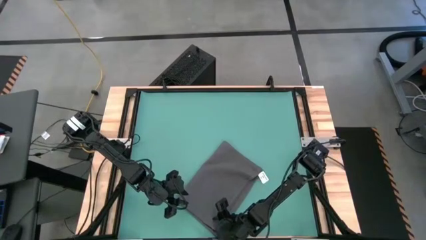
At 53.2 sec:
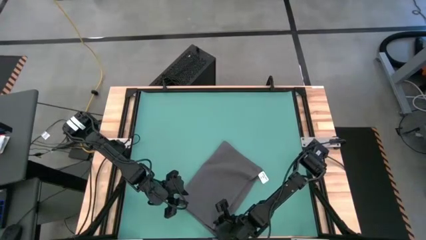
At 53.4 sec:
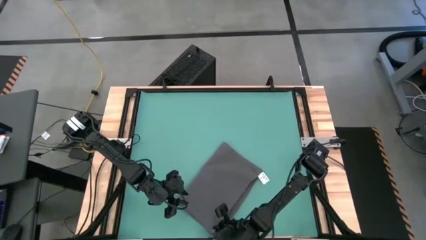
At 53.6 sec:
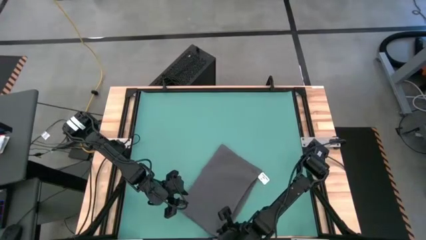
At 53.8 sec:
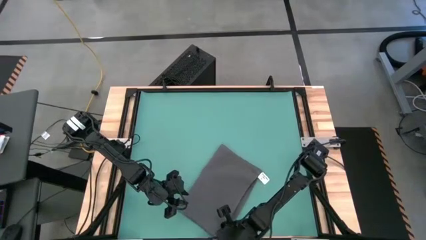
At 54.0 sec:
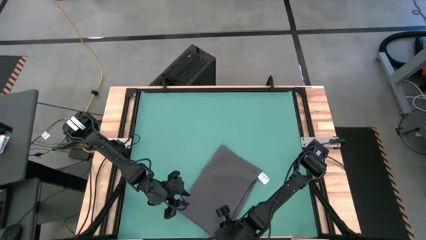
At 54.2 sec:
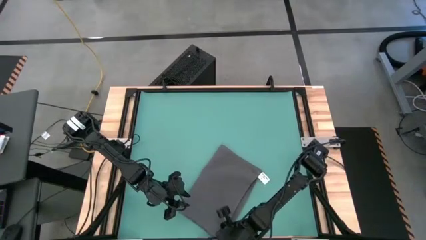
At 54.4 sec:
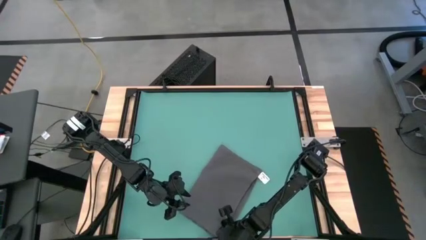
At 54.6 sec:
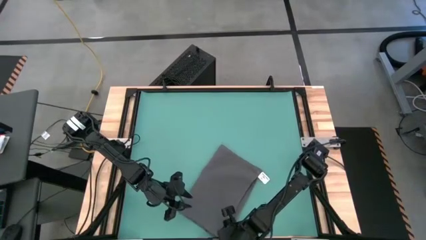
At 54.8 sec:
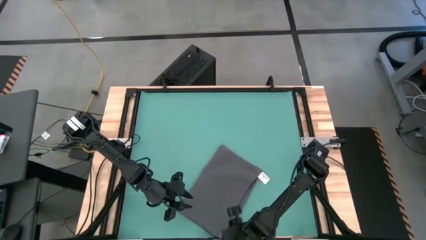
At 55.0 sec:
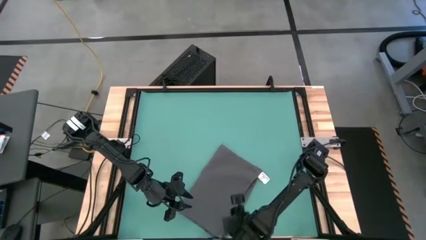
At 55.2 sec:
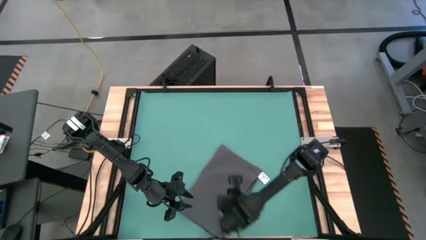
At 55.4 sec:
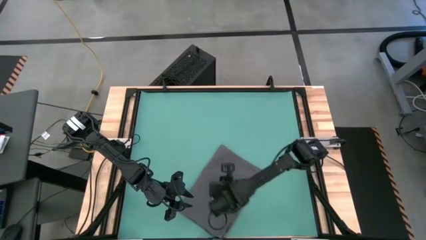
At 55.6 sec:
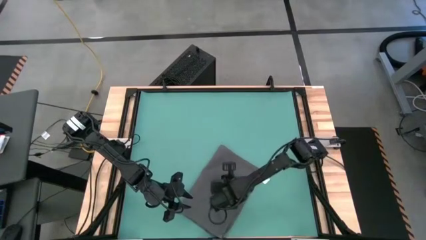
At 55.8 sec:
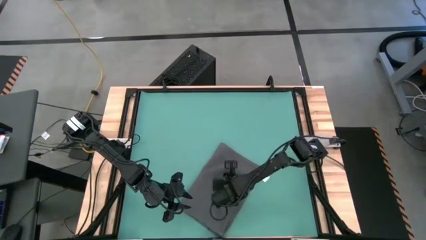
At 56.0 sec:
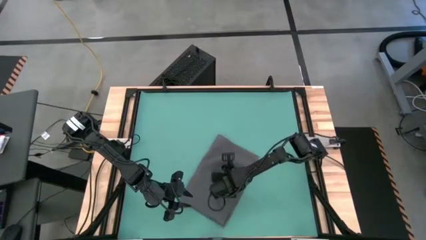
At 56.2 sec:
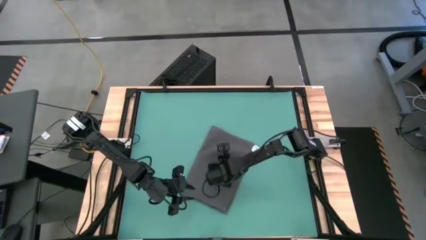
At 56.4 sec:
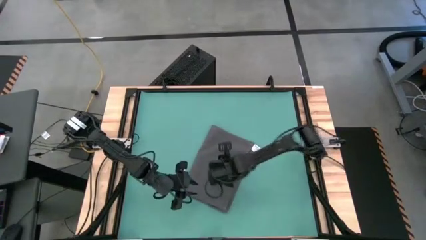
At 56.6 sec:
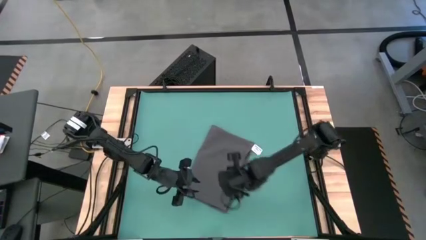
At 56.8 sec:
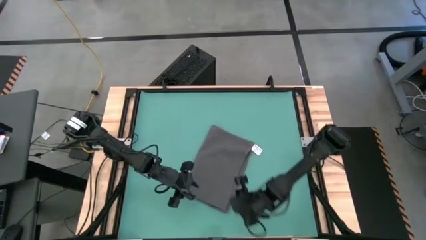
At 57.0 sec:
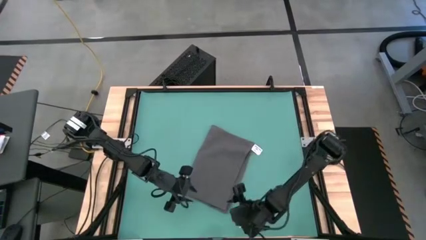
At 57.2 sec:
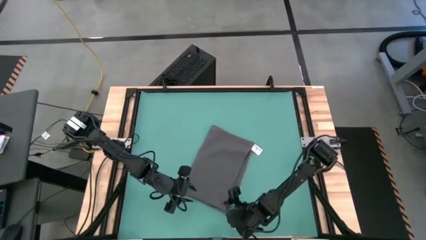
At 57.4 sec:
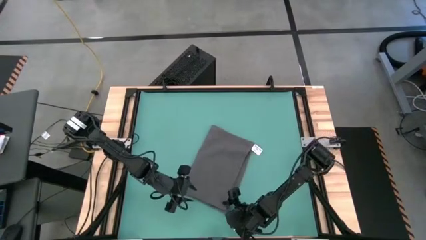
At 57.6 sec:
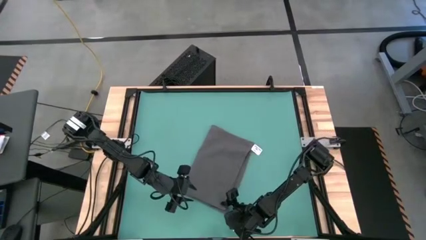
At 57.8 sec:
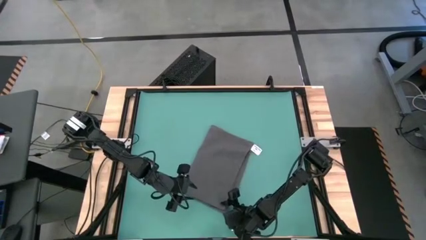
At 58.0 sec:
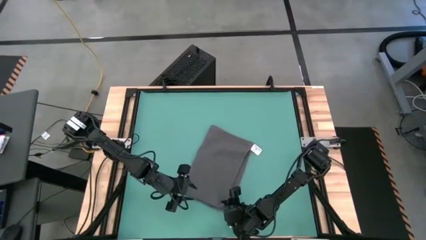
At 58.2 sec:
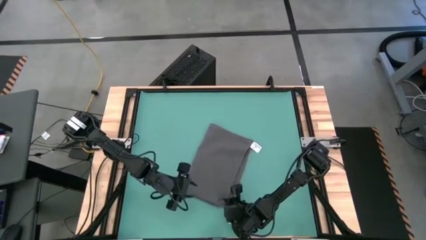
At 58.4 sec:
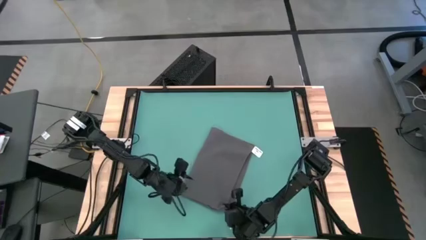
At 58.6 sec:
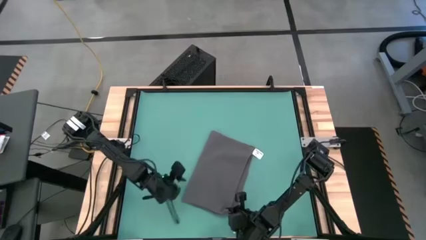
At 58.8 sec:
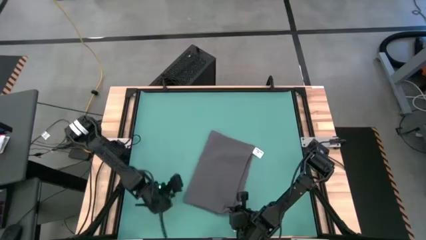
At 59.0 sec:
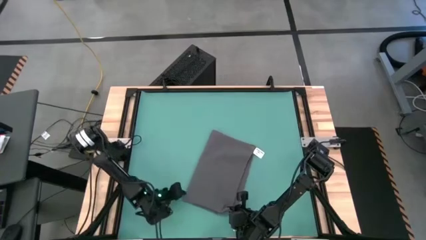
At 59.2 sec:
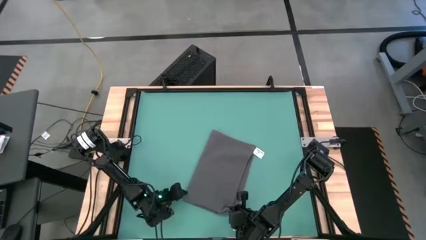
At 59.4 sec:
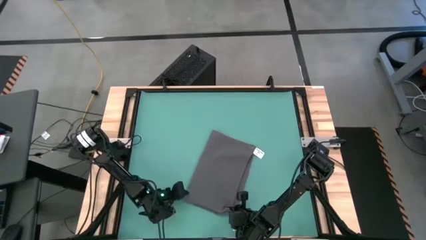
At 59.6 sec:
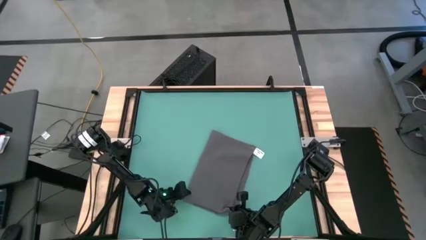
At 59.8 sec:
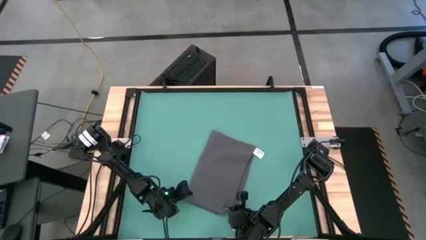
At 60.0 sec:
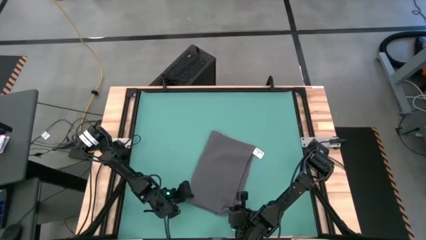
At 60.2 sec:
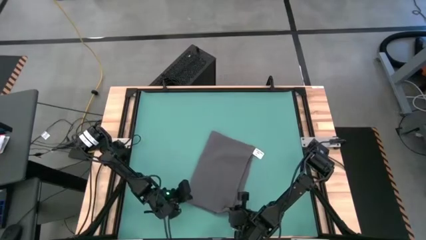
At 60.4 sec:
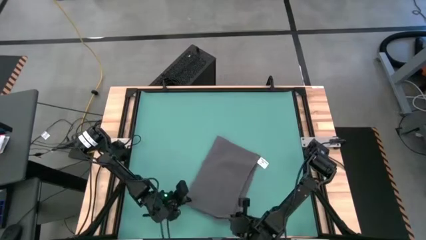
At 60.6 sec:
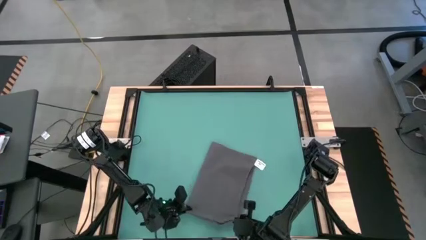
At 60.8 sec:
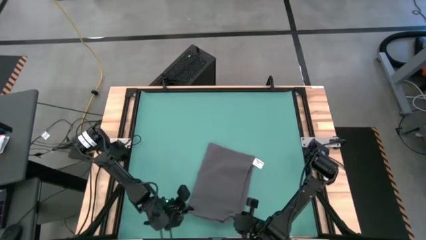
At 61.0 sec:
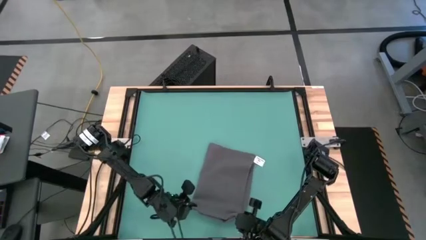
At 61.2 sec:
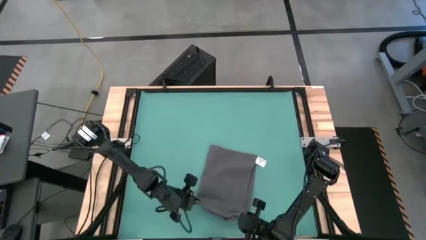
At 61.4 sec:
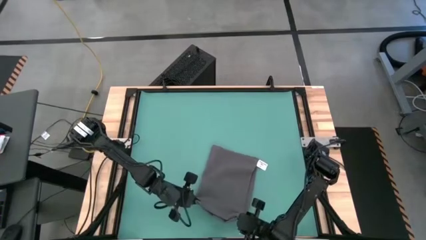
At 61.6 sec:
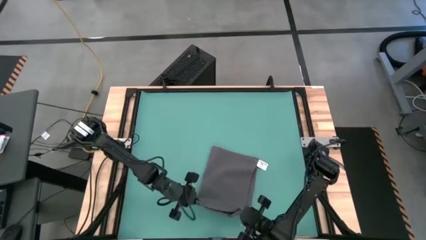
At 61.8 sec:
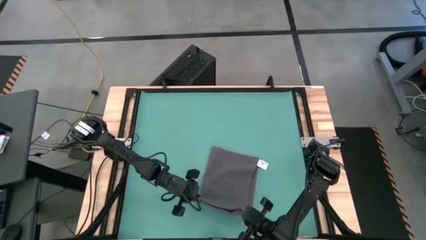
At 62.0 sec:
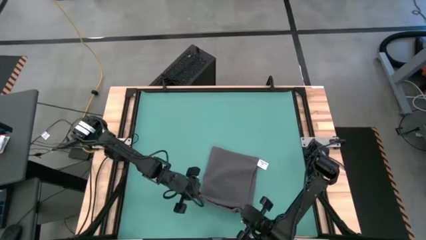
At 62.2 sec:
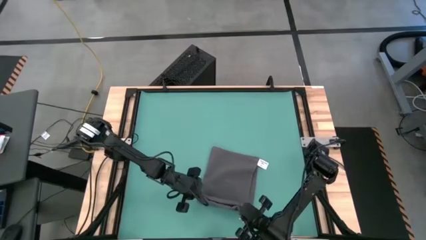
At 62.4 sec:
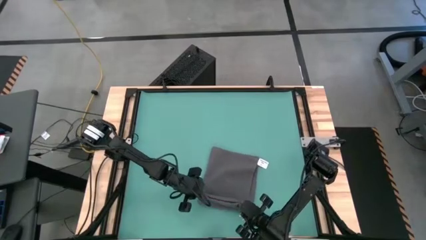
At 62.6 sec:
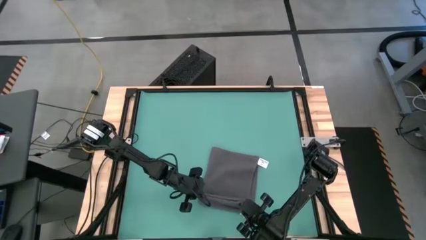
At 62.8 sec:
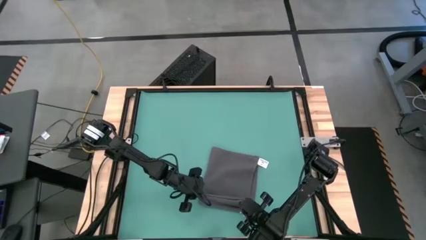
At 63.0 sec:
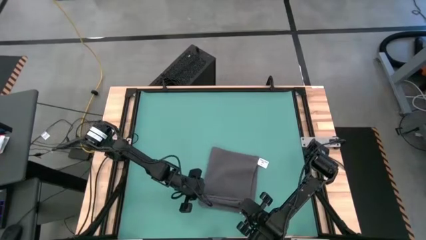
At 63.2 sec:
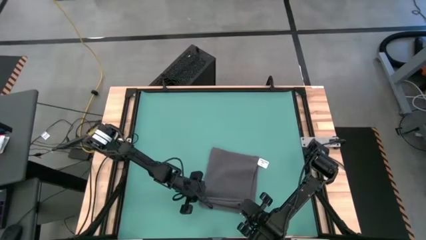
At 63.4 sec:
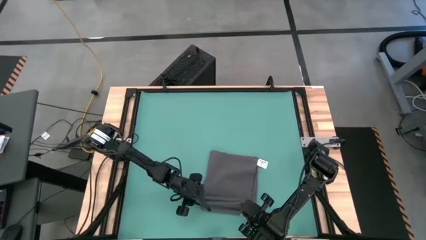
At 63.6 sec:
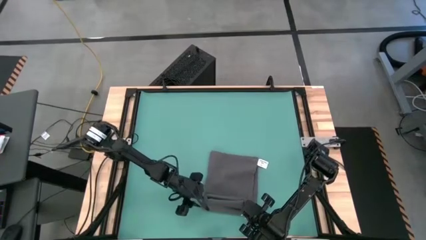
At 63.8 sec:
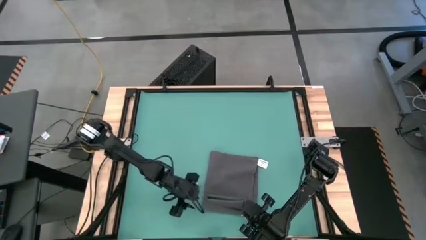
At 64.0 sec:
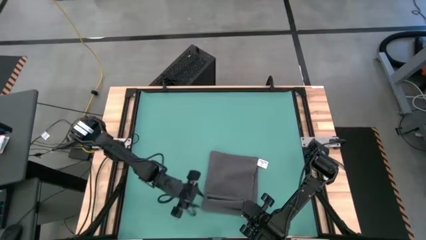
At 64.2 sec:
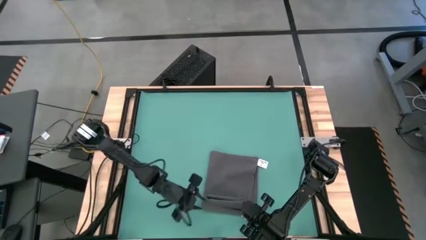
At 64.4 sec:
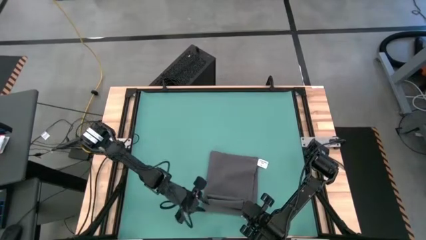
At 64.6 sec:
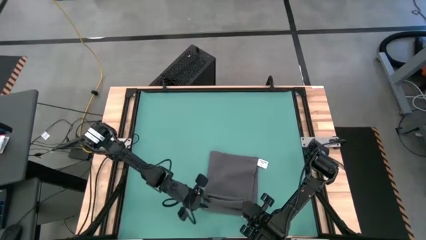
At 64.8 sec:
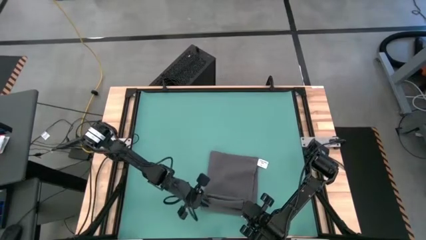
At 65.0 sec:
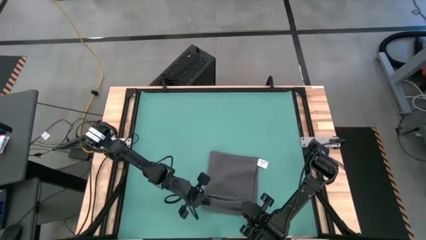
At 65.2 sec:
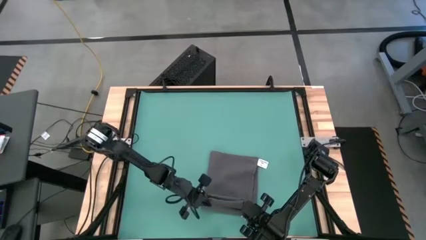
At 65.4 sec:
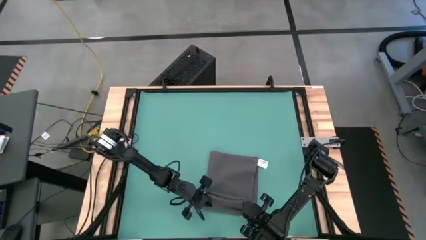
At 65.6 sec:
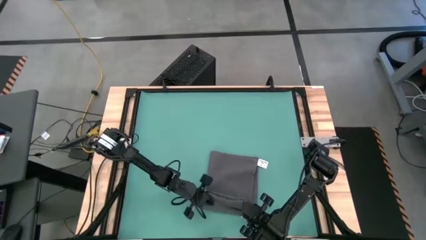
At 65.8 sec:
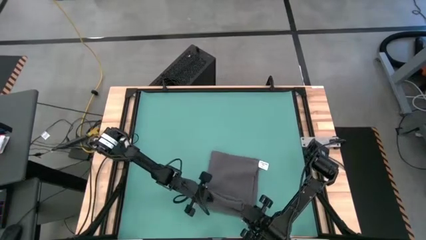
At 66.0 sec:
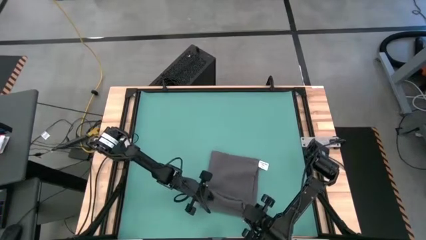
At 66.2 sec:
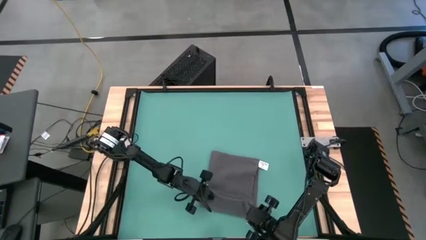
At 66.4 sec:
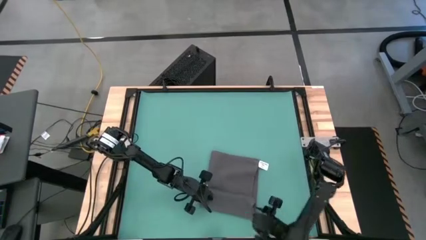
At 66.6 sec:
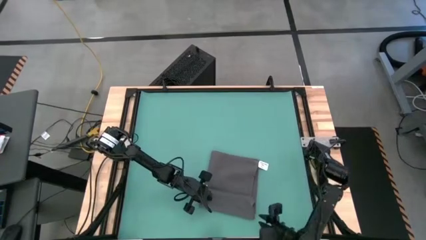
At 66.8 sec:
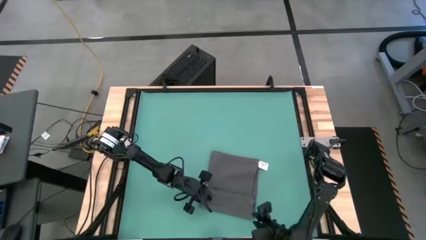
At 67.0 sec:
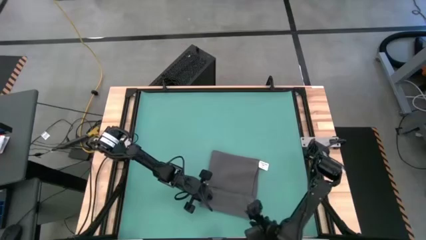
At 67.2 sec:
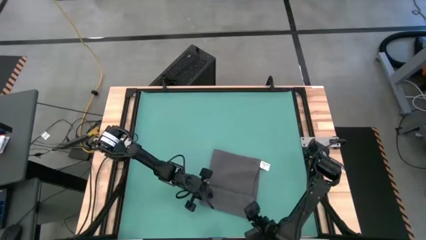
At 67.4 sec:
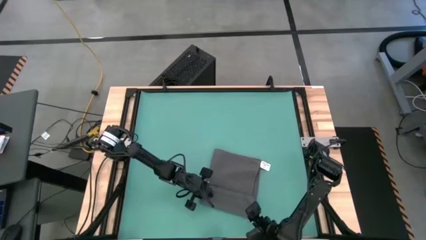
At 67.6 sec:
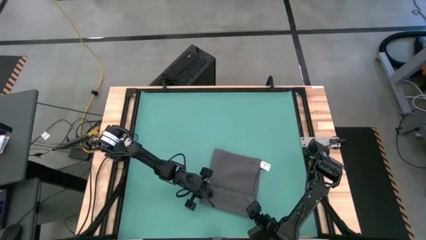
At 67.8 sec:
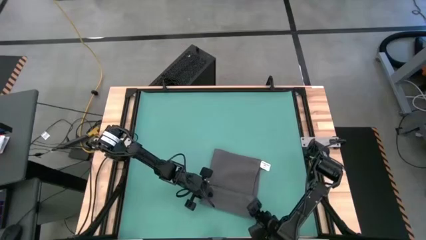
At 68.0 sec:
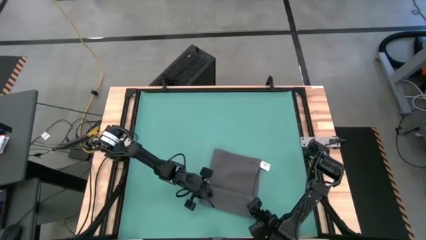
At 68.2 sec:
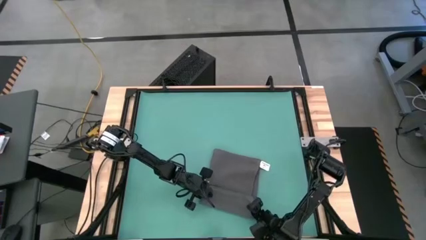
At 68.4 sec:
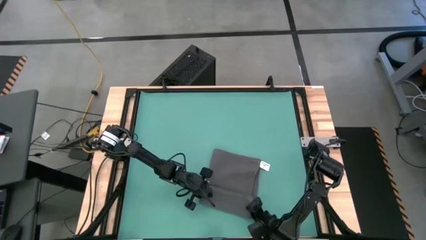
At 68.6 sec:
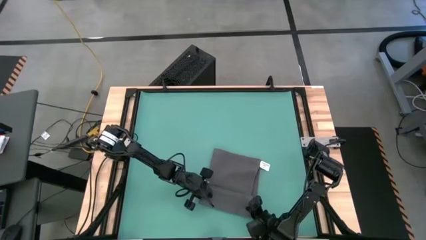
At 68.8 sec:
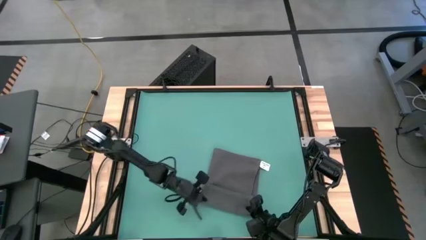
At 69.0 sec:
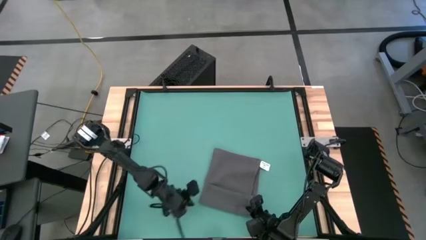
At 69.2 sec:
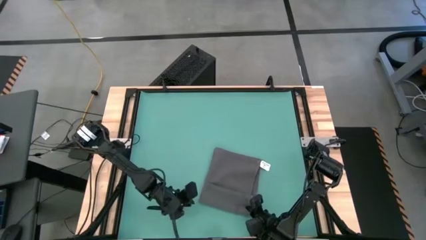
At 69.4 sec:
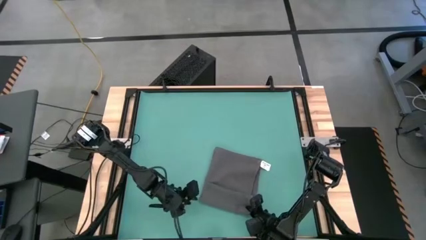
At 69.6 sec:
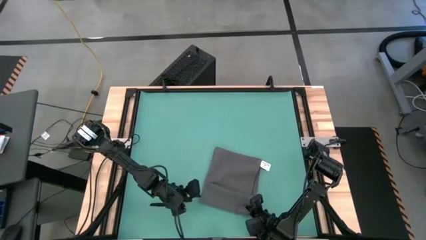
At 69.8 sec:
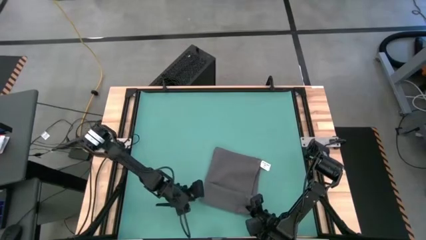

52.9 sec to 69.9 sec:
Task: Roll towel into tight, uniform cylinder
Roll the gray towel
